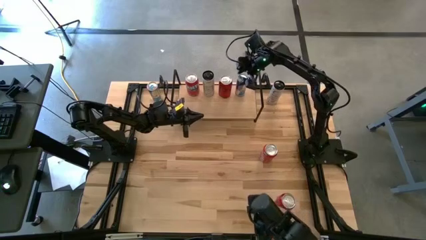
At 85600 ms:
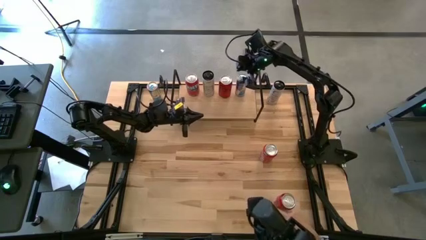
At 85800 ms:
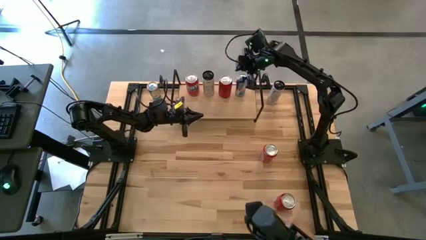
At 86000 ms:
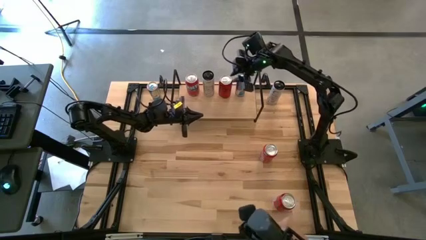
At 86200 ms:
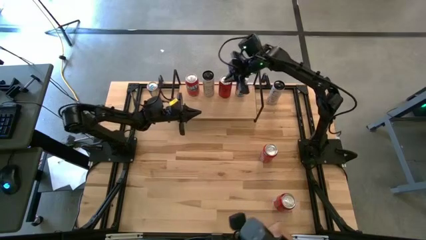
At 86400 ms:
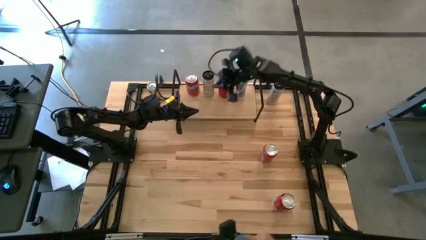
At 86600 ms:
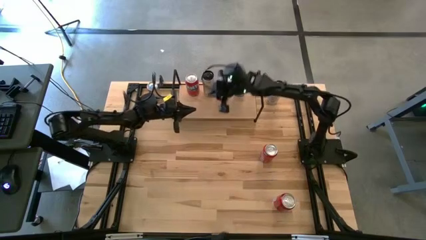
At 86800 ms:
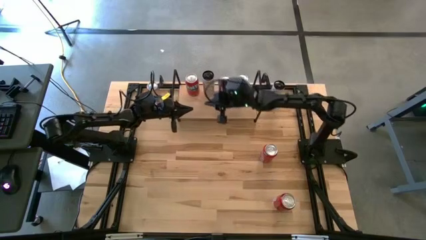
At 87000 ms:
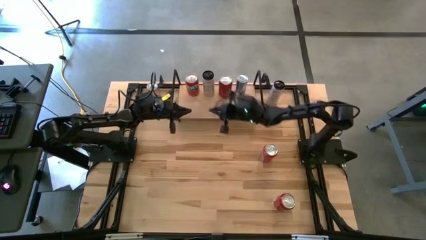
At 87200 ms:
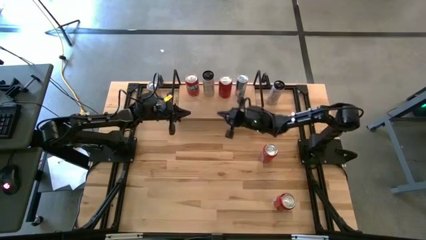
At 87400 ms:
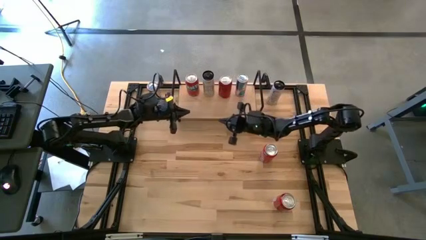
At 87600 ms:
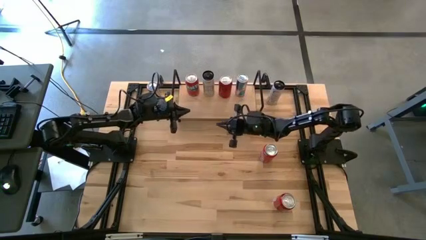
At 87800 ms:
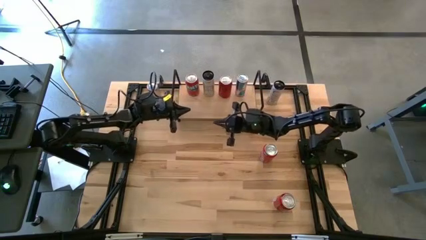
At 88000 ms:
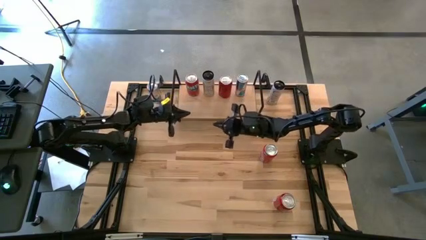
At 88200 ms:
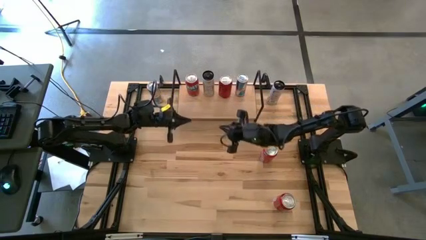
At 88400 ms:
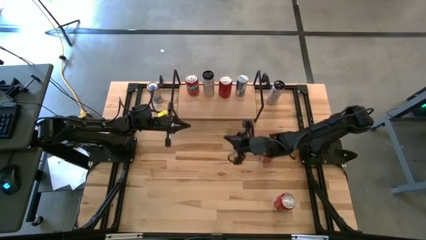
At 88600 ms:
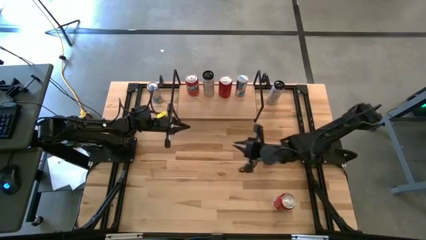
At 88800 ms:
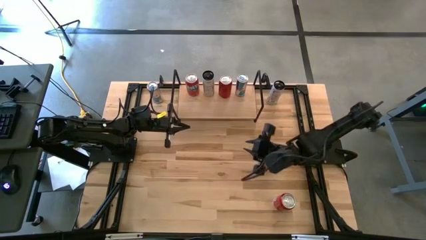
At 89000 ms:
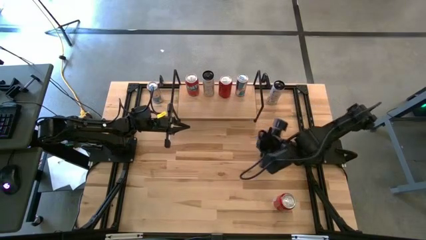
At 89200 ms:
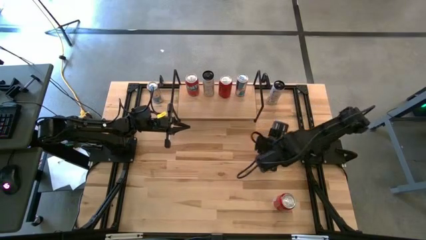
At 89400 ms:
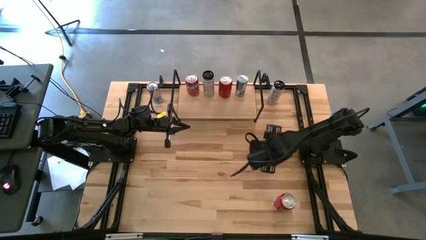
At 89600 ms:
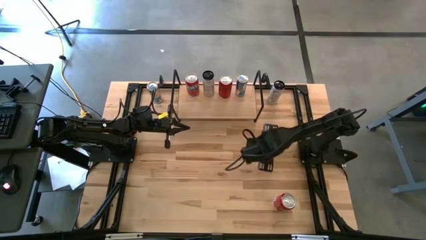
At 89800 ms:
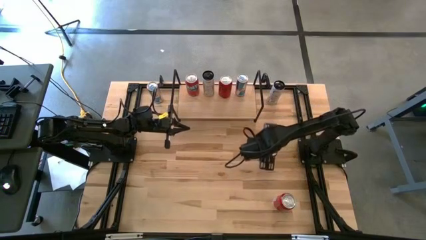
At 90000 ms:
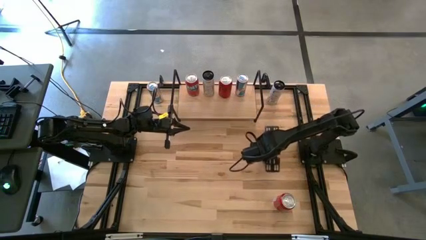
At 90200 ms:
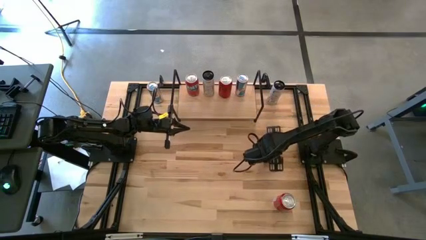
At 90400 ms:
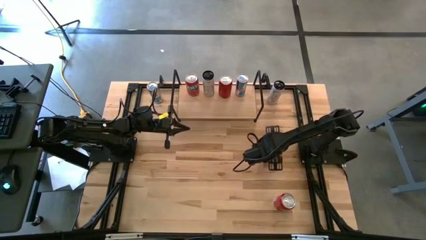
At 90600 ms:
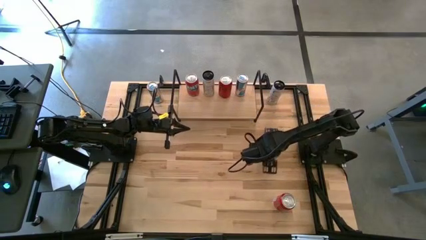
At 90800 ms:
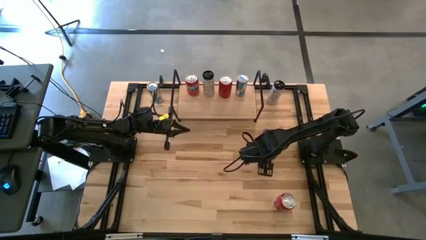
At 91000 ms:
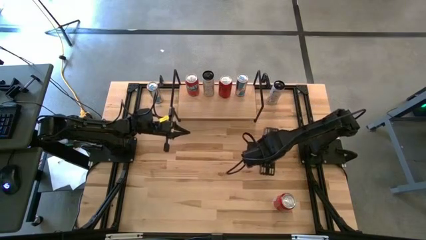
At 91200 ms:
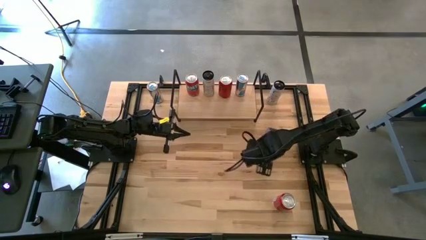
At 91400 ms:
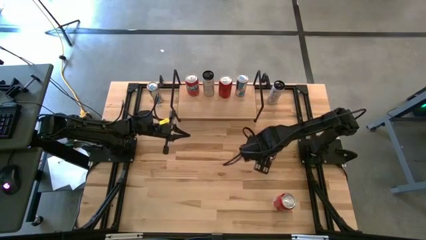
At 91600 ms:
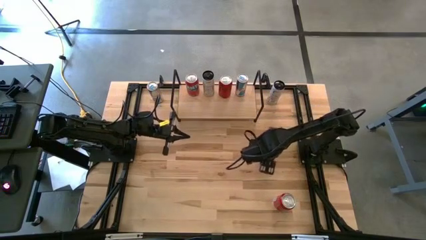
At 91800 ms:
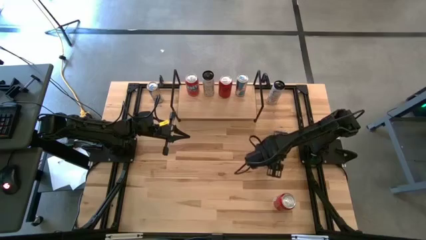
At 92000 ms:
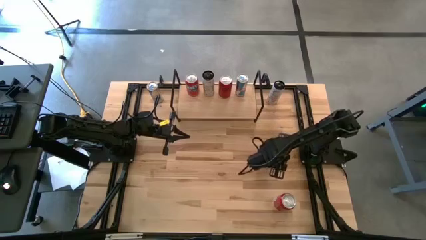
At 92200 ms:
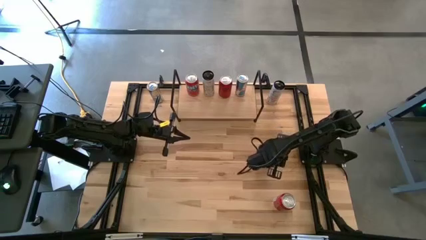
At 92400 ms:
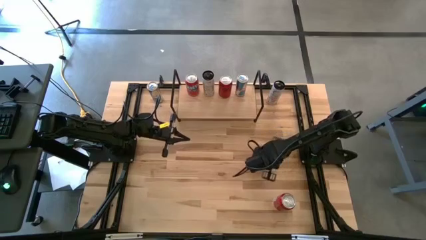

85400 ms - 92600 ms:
Task: Place canned beverage on shelf
Put the red soda can on the shelf aligned with the red soda can

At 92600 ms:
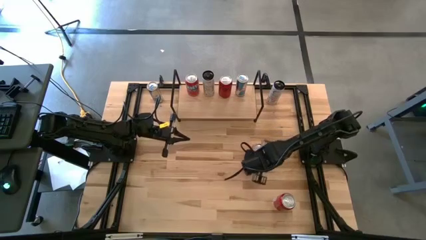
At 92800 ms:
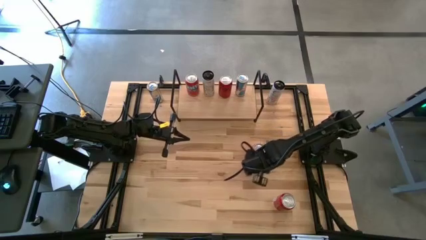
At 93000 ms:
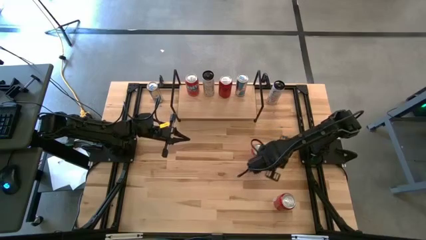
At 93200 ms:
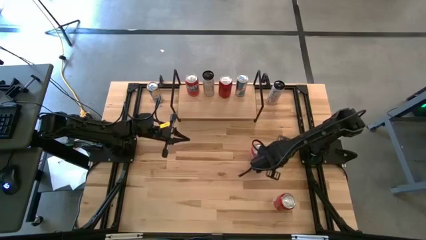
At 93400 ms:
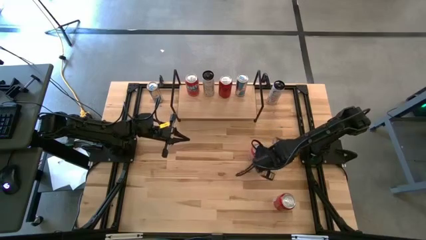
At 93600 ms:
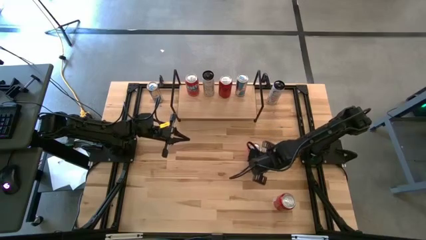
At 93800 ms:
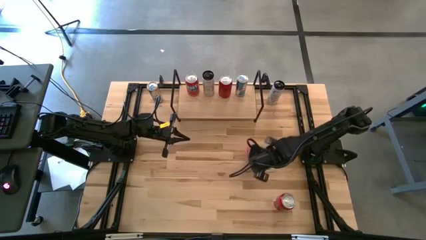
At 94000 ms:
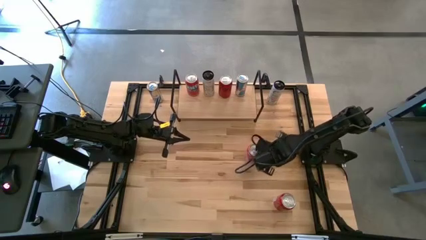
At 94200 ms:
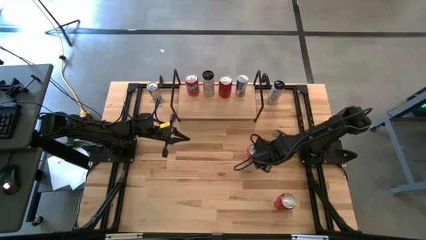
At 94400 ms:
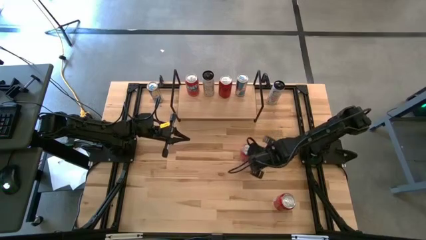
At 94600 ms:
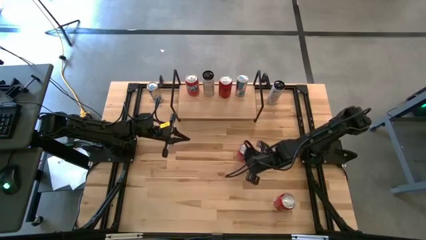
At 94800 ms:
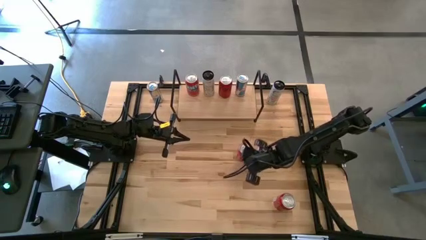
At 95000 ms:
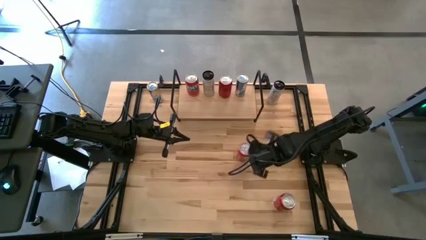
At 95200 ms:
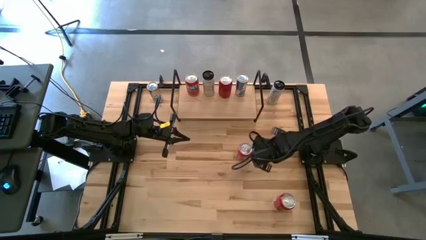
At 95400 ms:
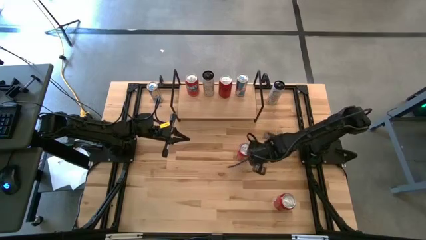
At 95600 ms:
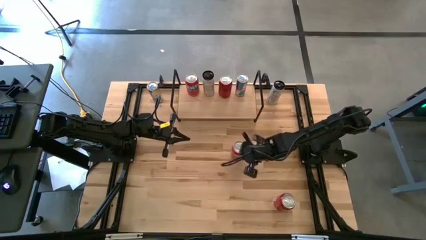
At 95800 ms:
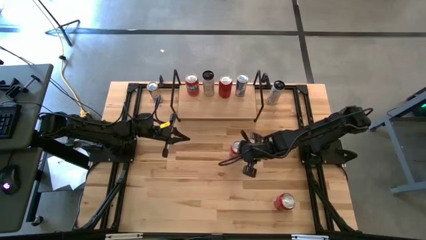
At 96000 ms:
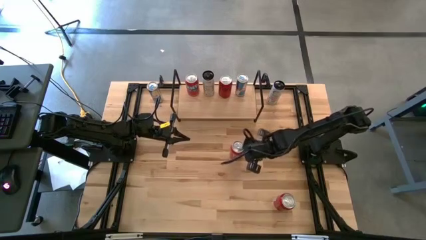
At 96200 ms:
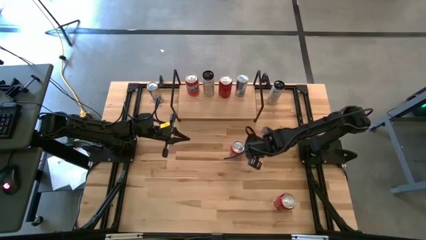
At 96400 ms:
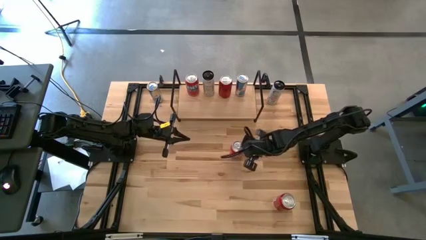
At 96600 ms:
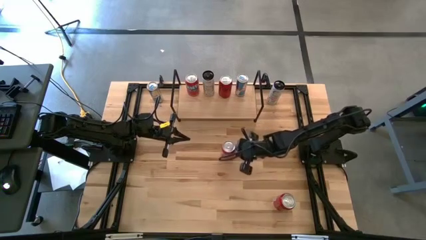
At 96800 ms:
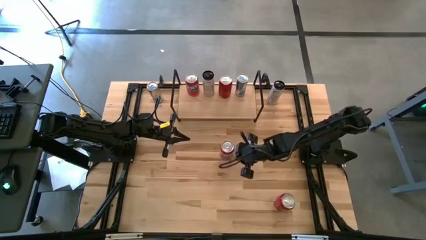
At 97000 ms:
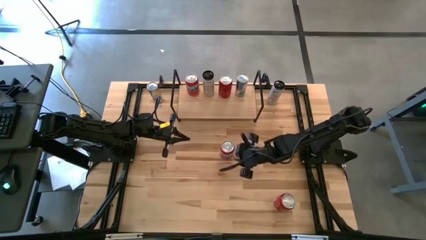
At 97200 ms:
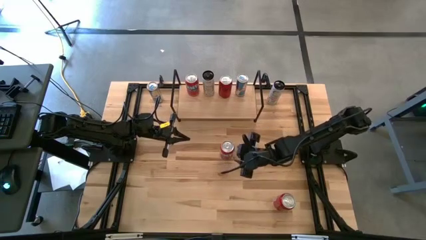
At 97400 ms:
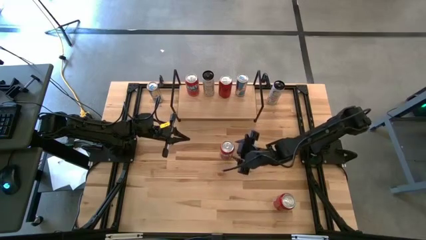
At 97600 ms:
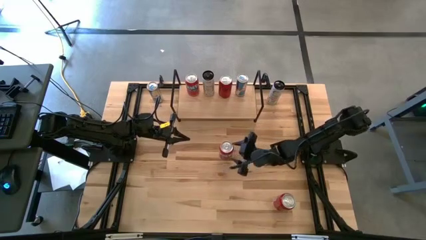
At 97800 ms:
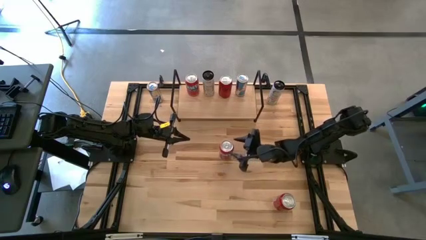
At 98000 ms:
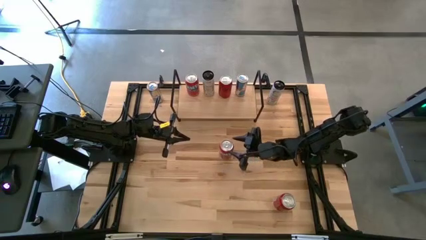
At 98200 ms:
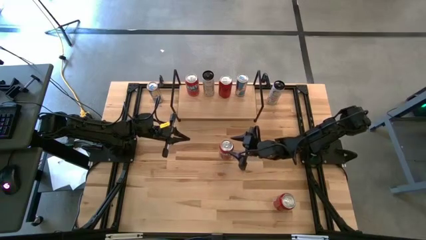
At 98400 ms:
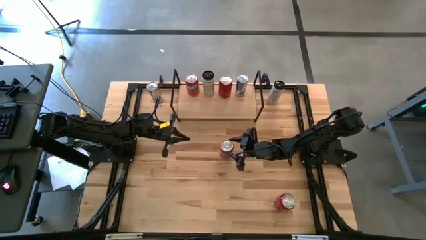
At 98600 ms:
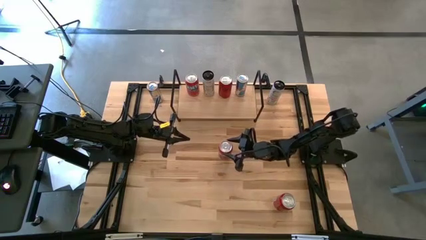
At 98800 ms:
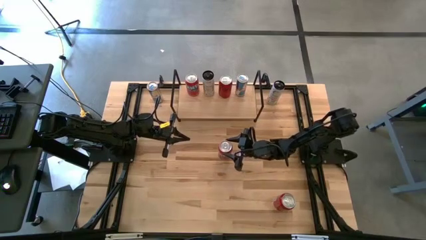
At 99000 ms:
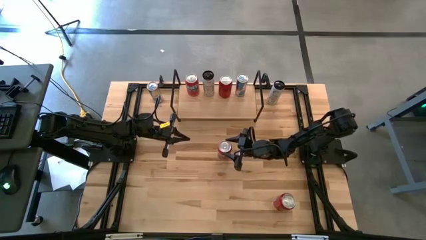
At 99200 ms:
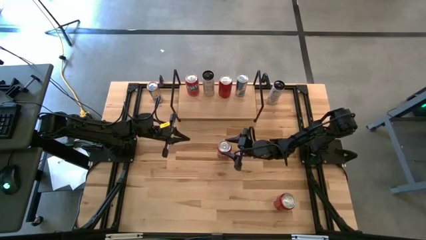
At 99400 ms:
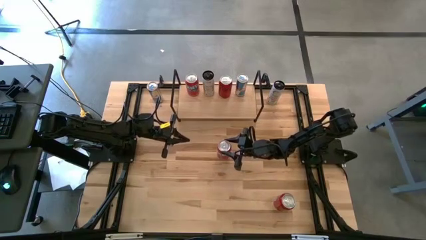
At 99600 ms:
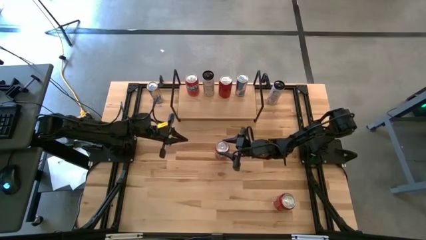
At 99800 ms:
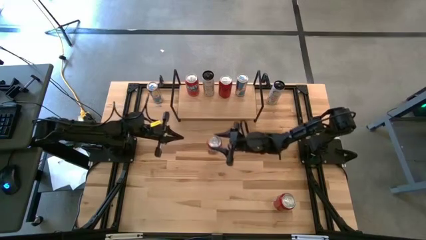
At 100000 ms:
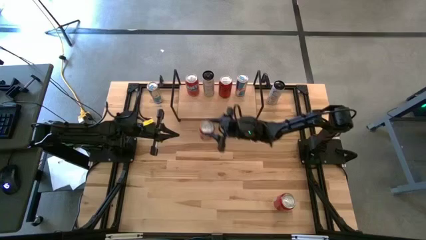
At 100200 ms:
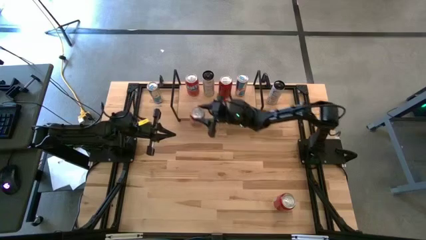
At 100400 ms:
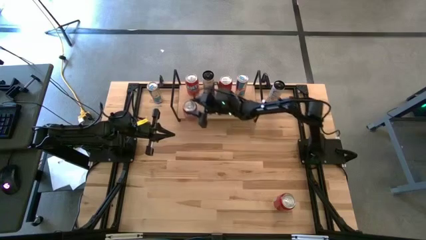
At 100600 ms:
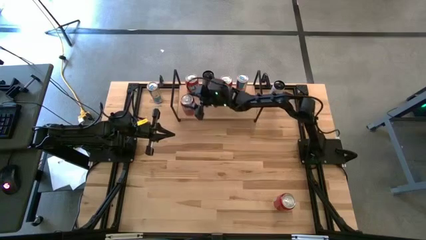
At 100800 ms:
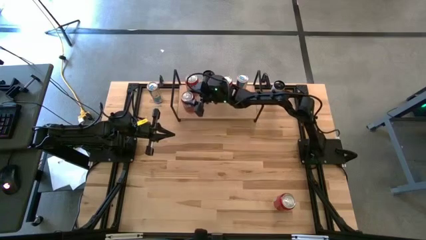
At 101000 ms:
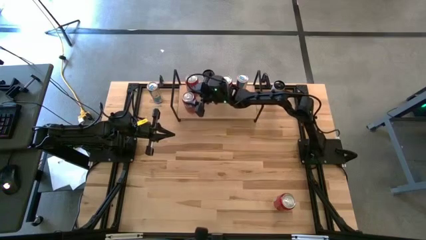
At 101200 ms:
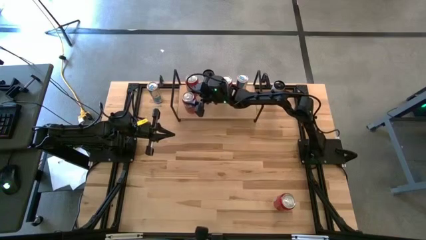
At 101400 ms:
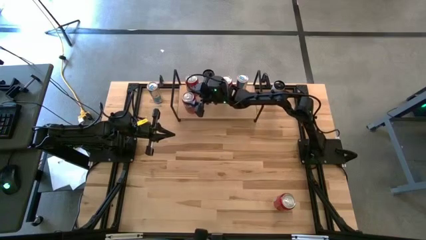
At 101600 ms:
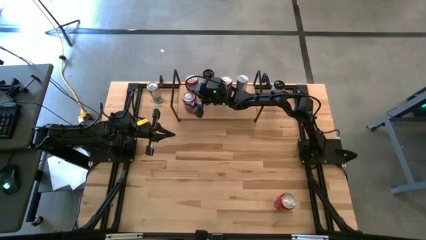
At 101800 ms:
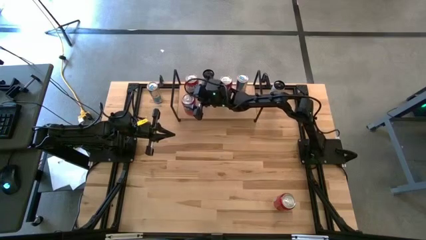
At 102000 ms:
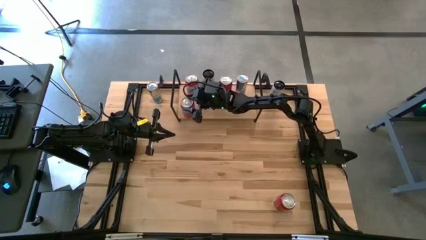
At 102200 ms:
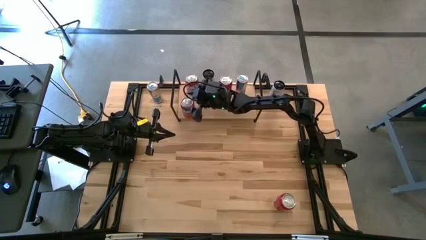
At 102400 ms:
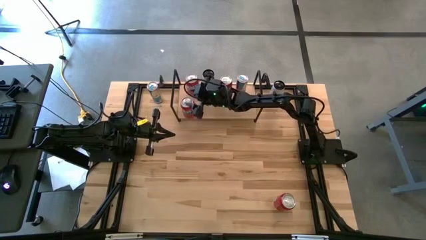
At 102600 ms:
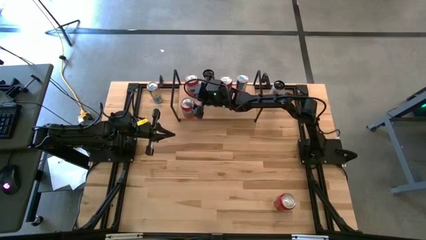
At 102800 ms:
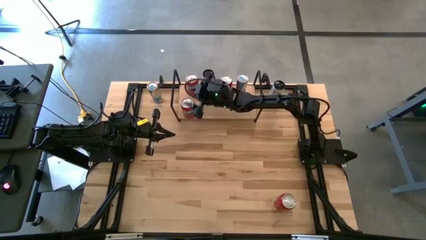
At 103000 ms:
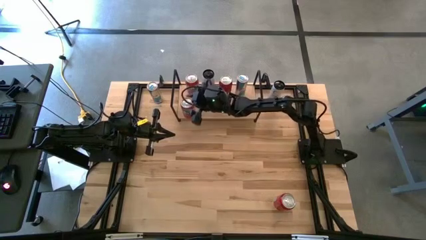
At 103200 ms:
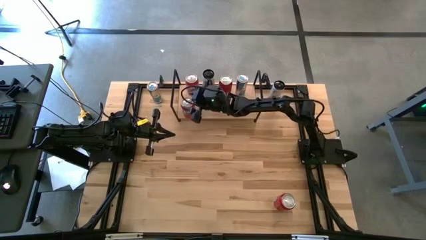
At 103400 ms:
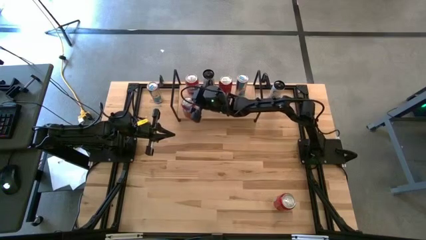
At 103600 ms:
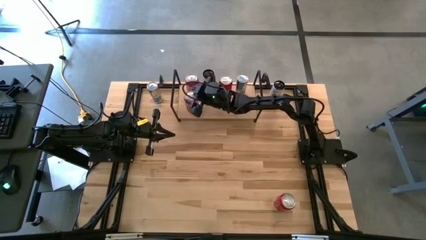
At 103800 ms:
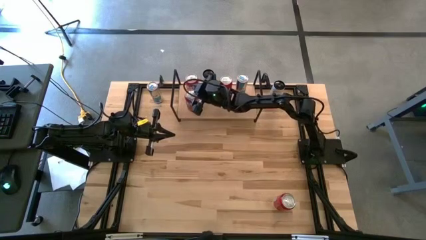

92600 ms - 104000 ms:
Put the red soda can on the shelf aligned with the red soda can
